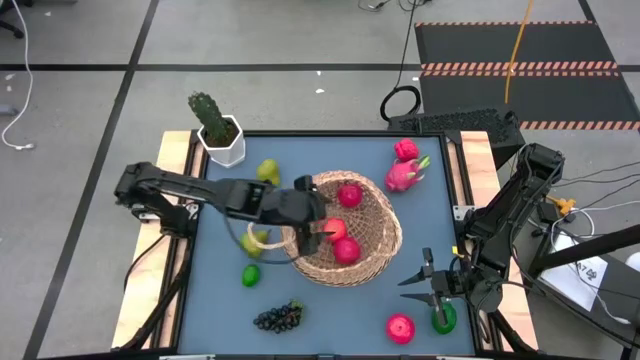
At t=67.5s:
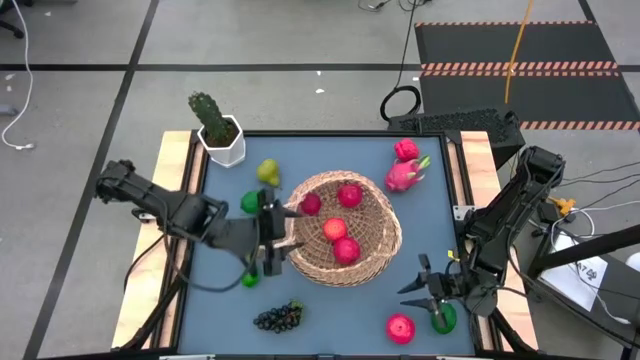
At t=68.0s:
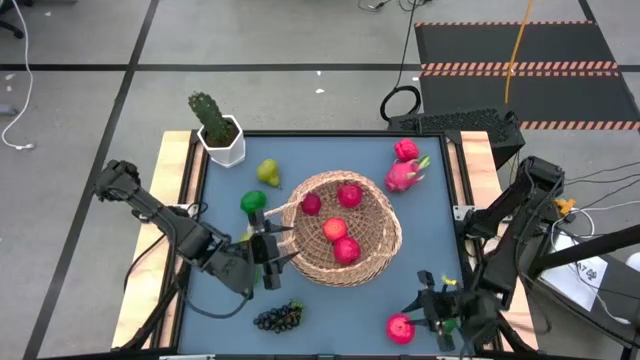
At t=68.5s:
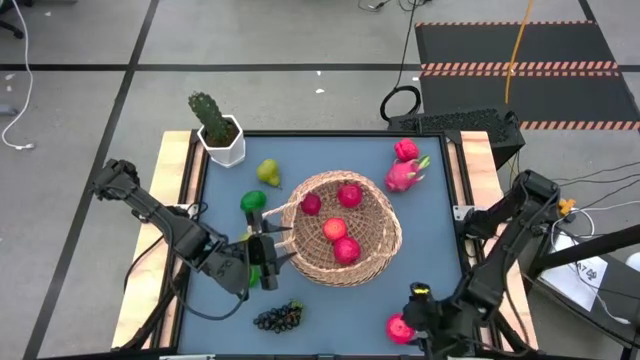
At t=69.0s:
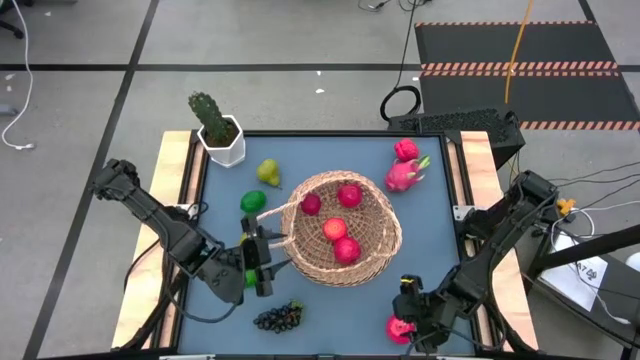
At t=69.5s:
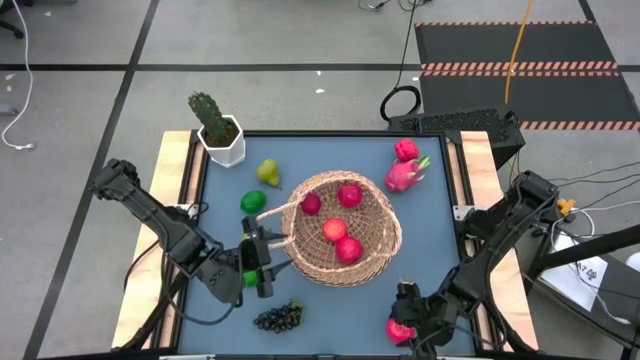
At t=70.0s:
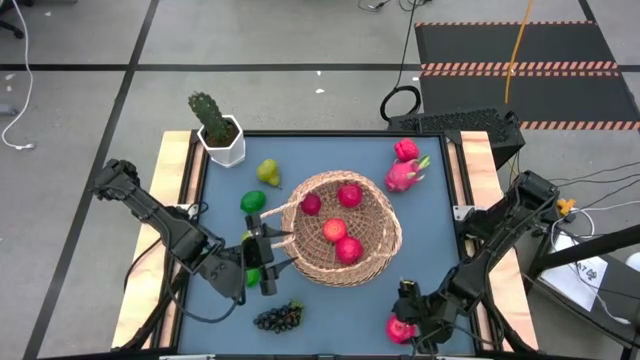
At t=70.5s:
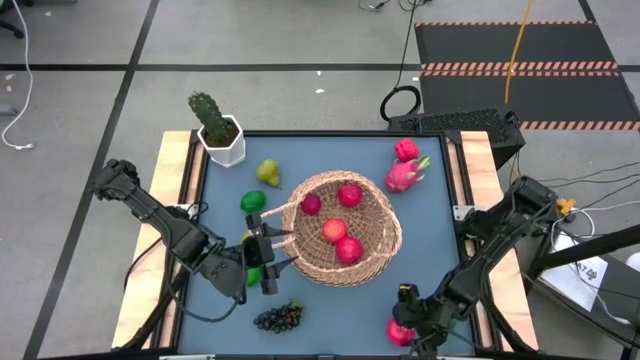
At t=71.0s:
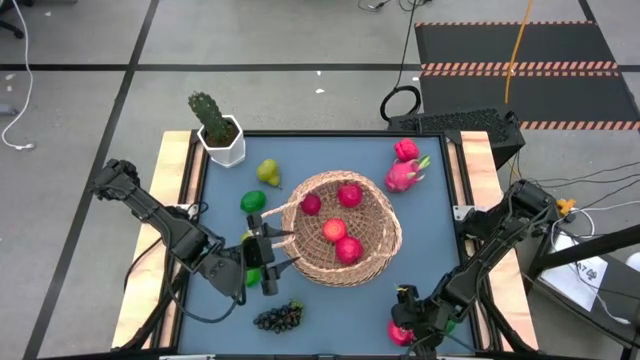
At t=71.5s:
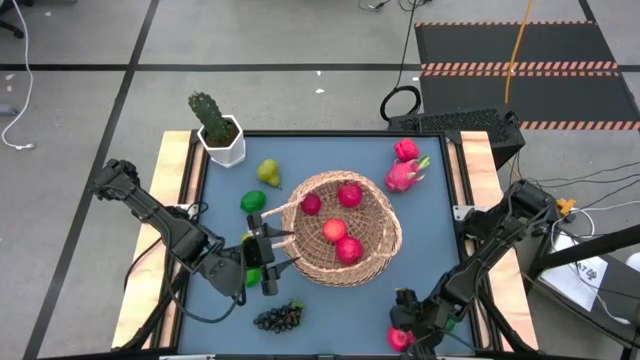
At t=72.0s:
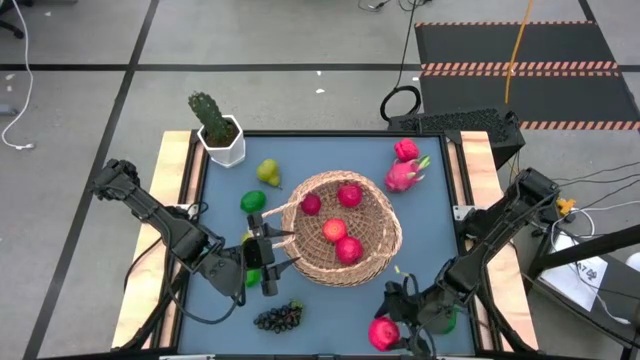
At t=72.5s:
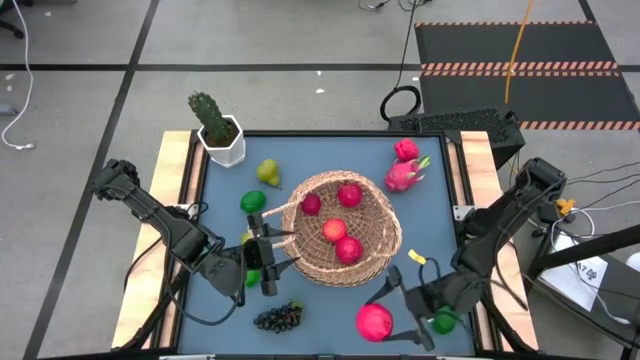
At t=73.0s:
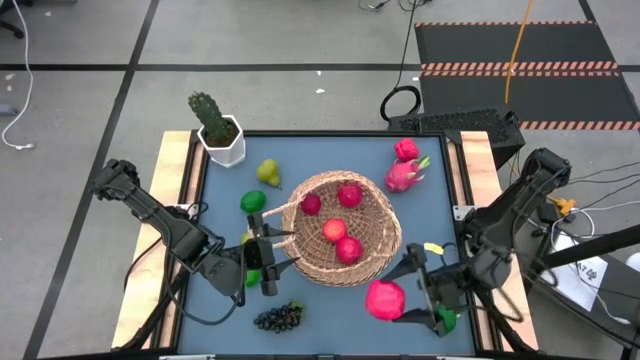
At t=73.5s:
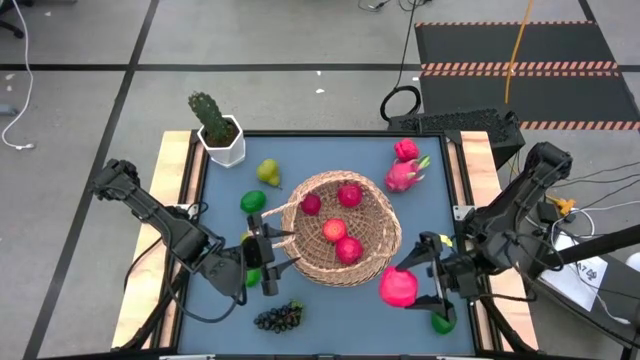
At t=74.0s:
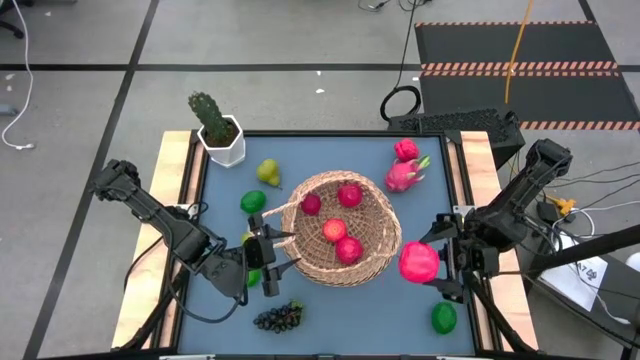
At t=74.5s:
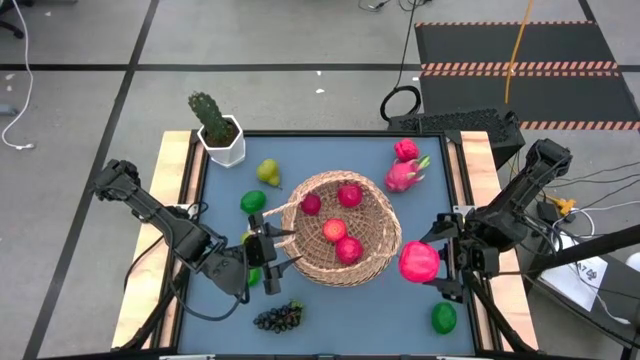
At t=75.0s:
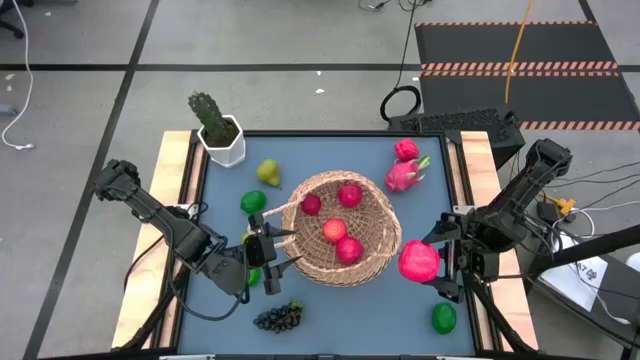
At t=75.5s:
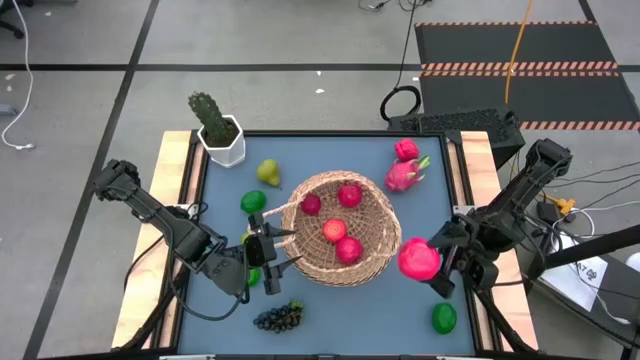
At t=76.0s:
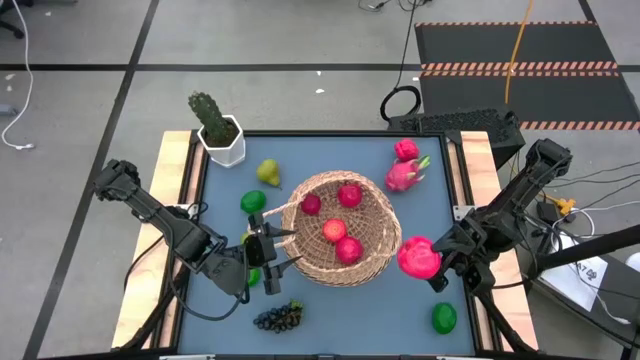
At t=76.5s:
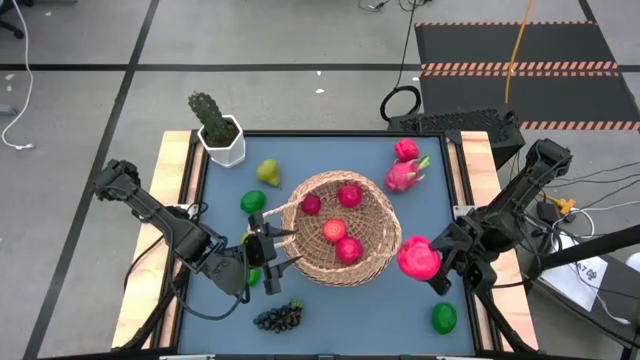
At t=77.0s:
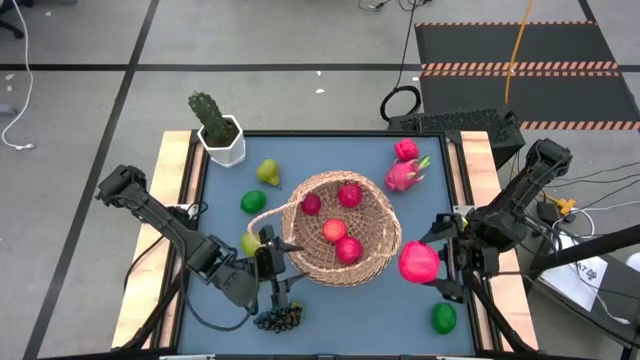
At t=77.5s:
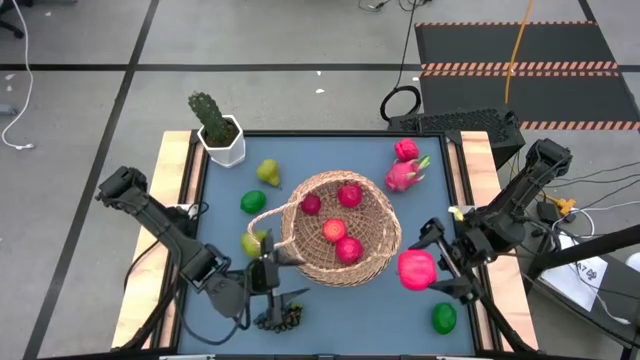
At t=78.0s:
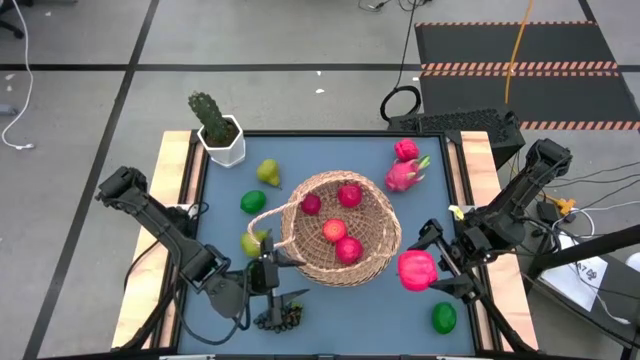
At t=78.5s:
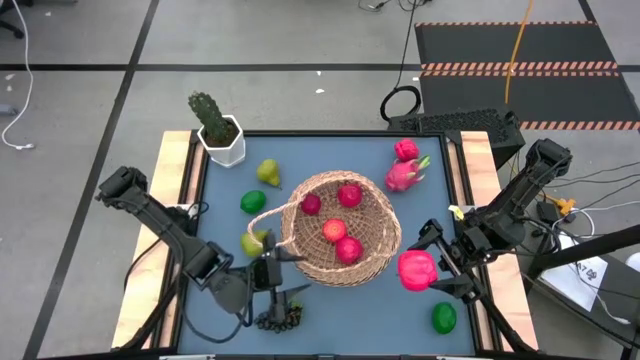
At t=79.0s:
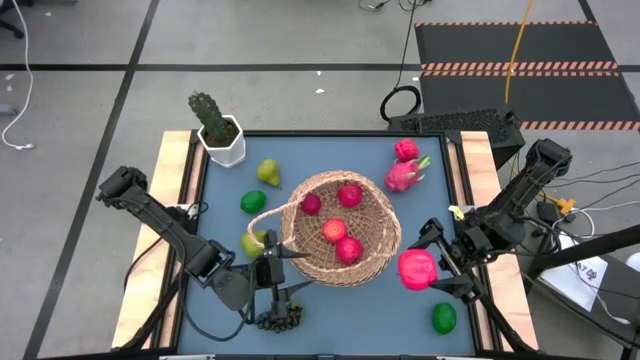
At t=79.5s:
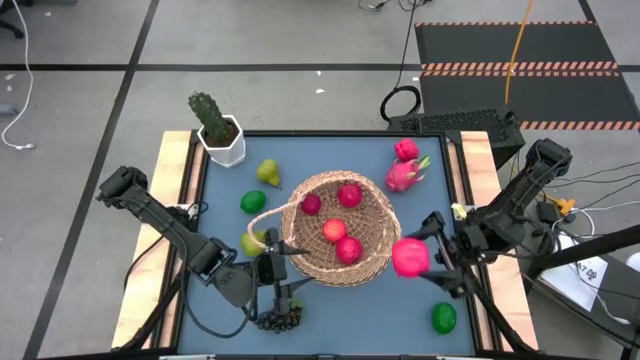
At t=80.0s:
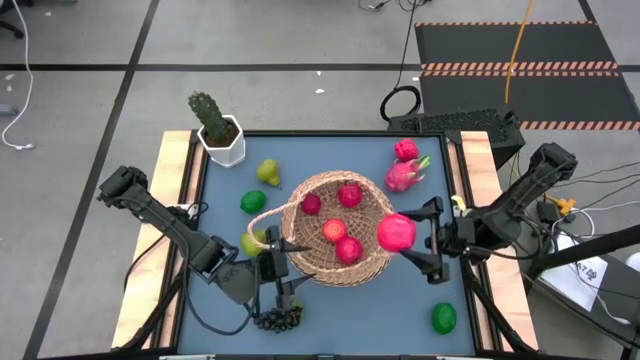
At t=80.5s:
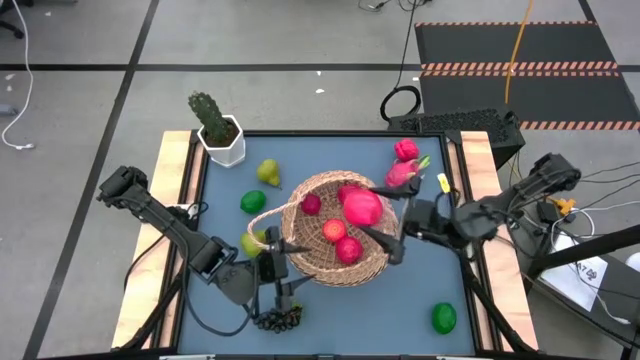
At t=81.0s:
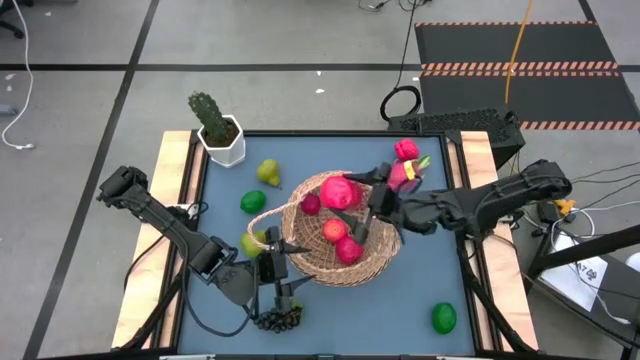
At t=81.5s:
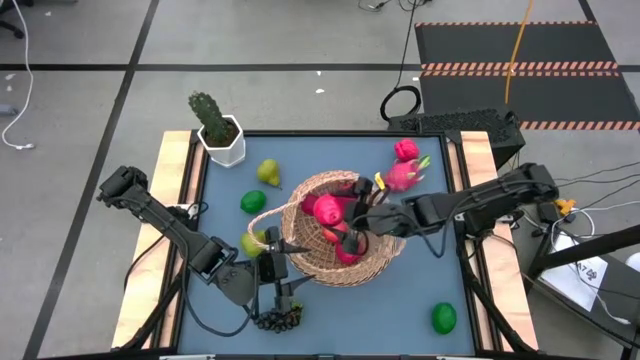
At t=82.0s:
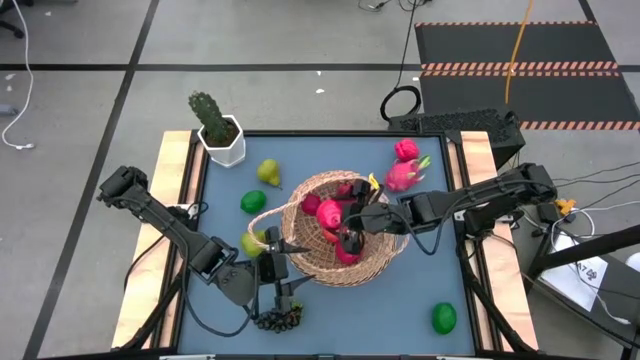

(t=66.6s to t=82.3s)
Task: Build produce basket
Put the red apple into the brown basket

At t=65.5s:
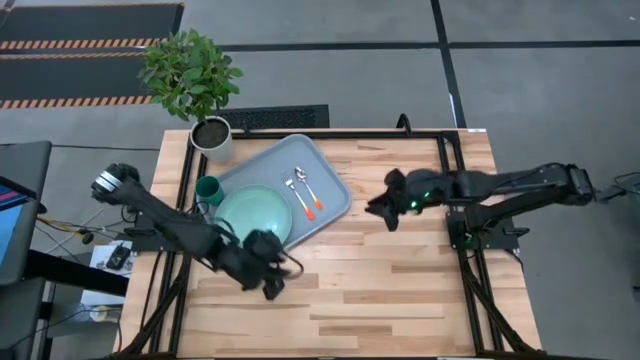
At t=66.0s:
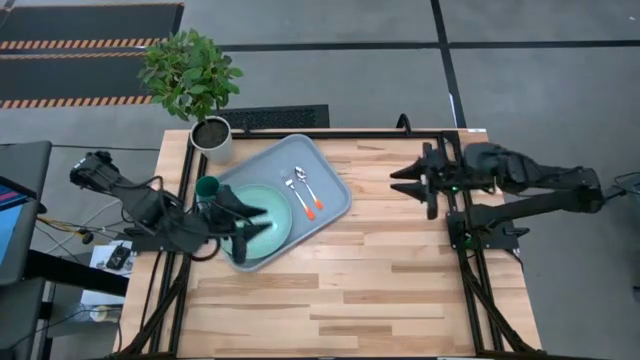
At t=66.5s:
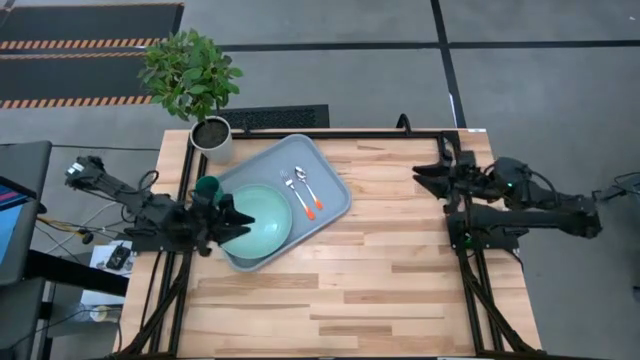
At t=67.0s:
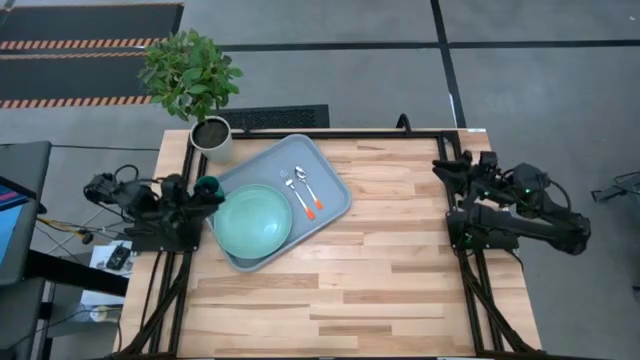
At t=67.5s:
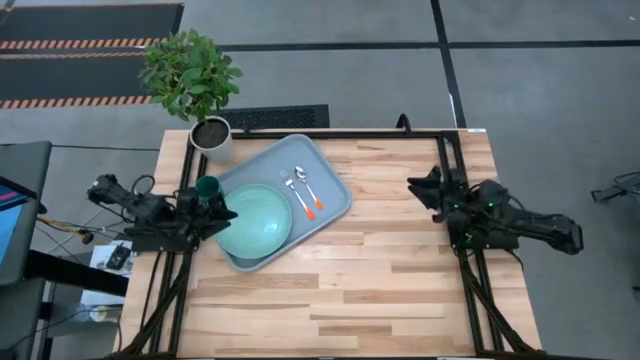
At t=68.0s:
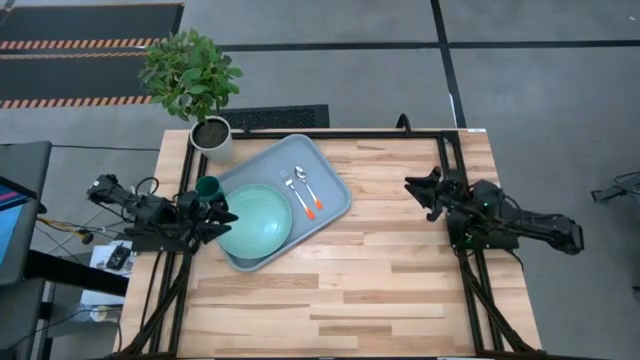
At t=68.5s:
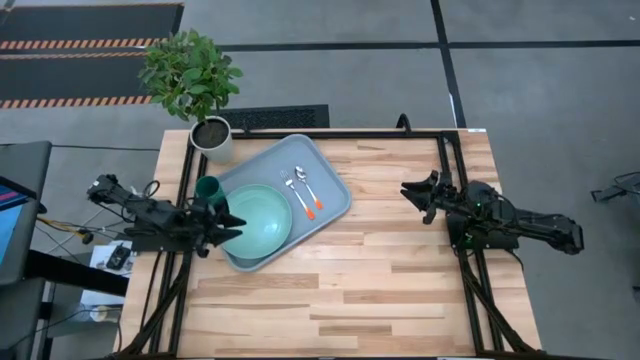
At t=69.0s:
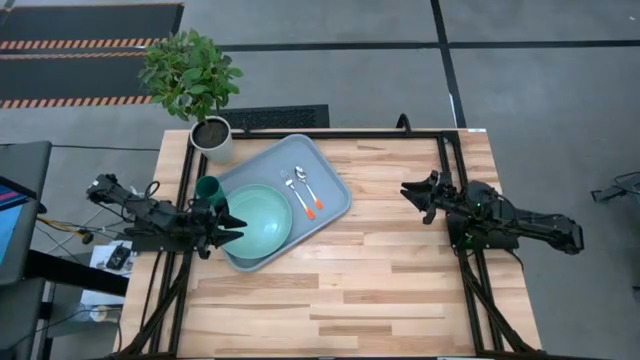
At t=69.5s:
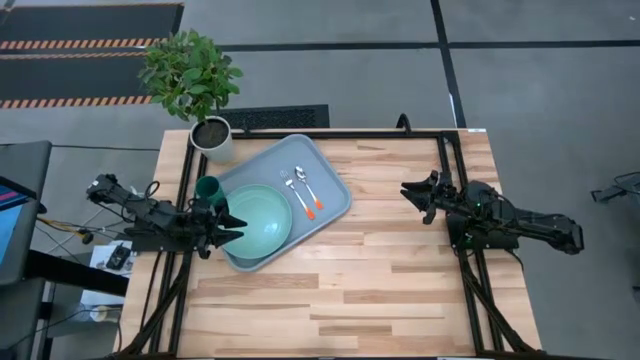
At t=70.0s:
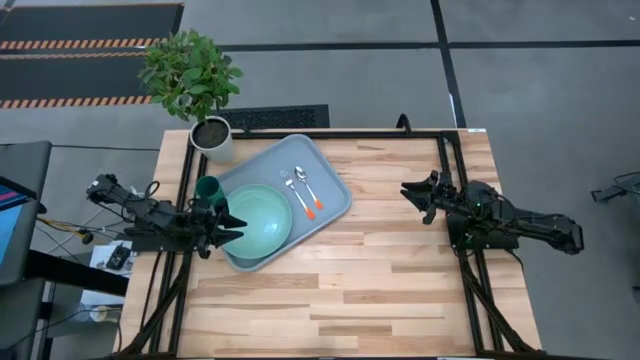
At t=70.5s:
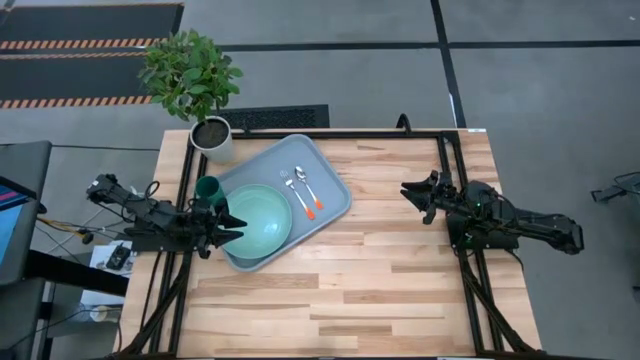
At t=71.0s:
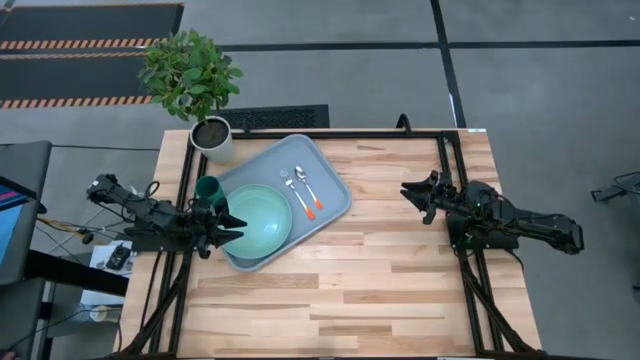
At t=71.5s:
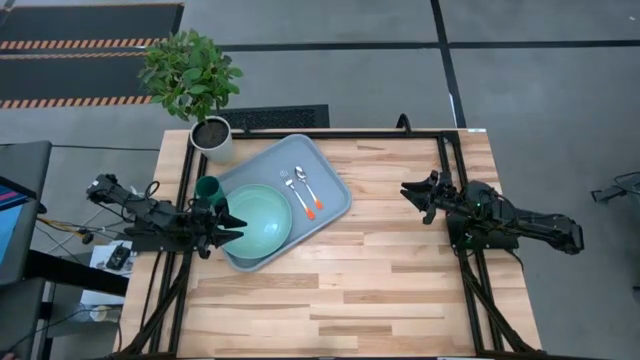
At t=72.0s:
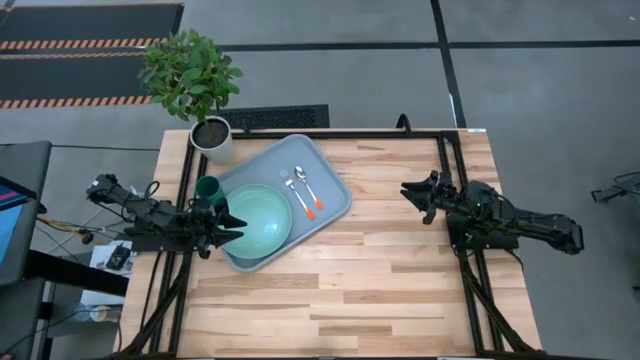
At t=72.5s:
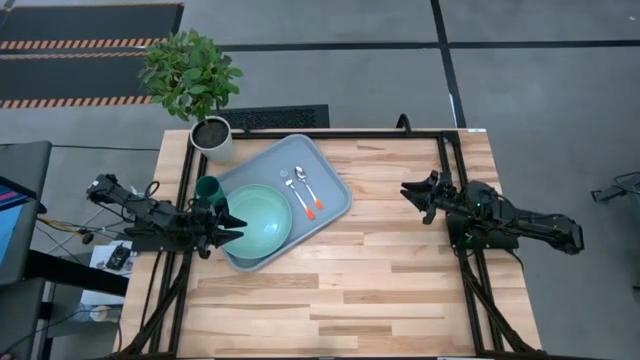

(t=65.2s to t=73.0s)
Task: Pick and place plate/cup/fork/spoon on tray
Return to Home Position
